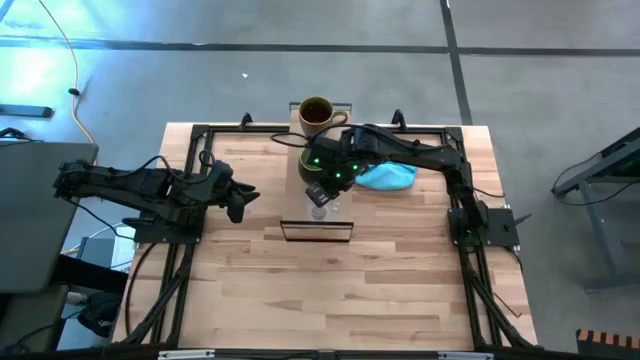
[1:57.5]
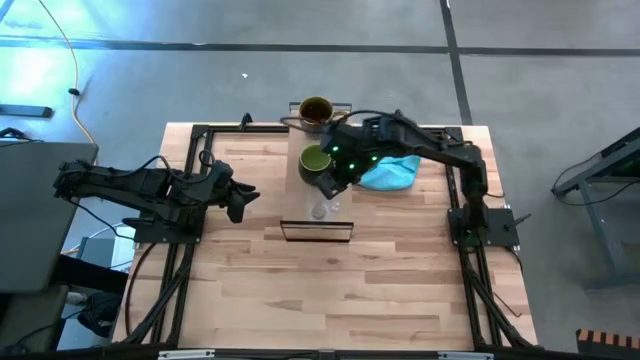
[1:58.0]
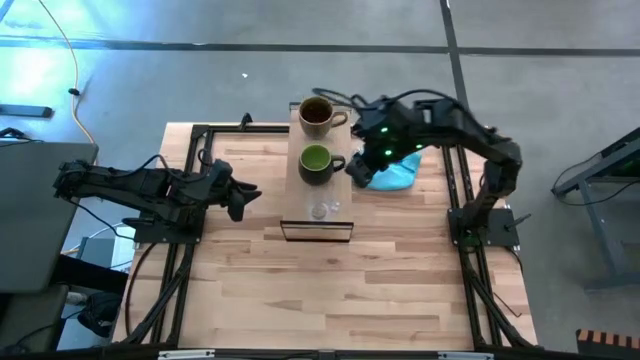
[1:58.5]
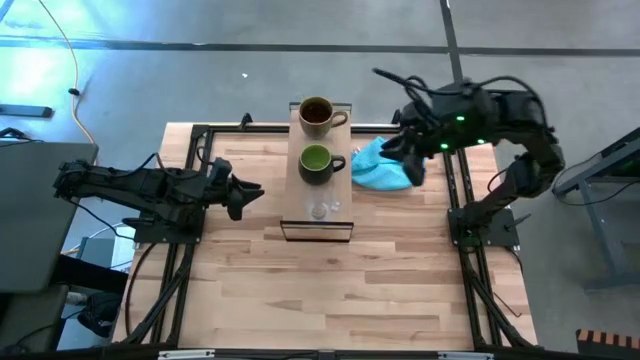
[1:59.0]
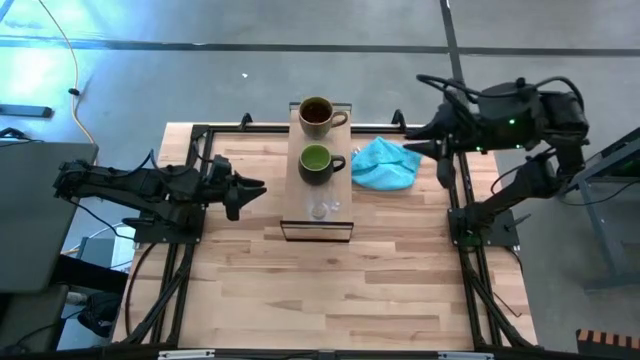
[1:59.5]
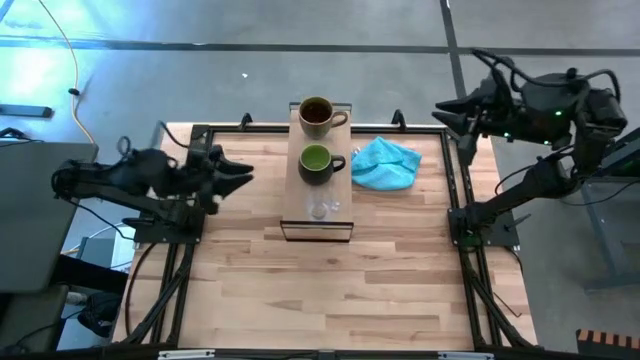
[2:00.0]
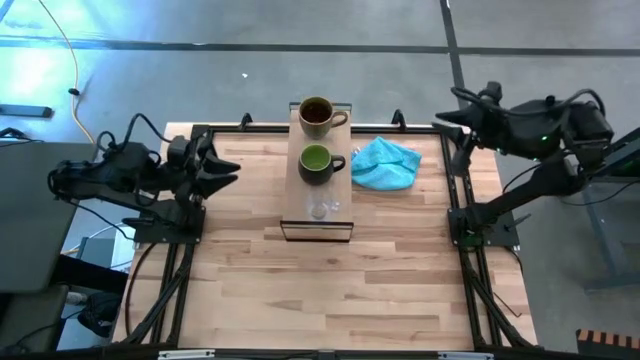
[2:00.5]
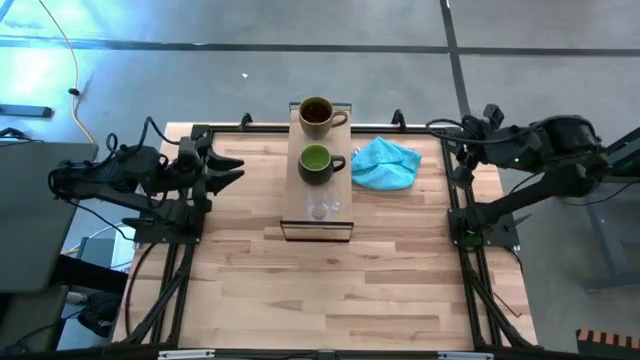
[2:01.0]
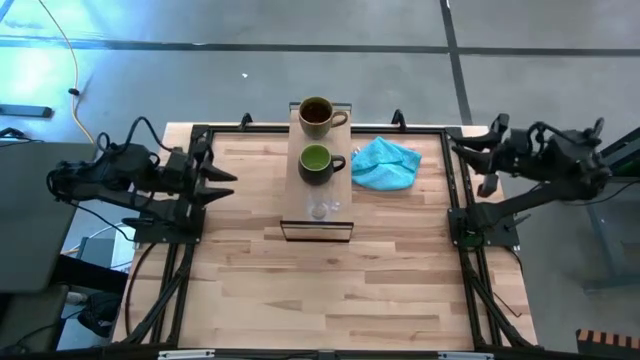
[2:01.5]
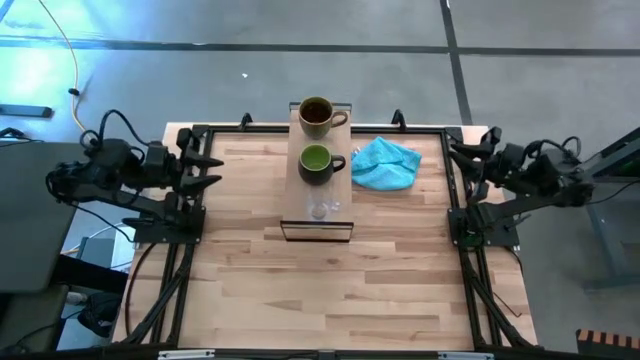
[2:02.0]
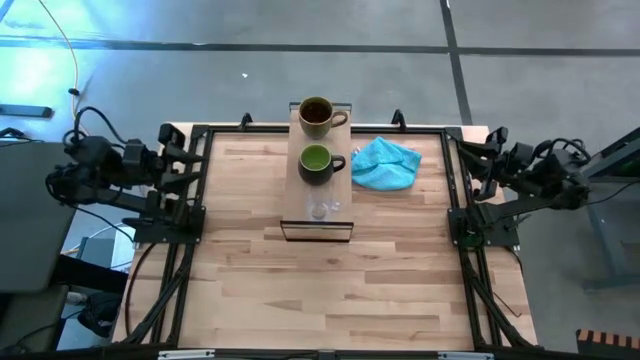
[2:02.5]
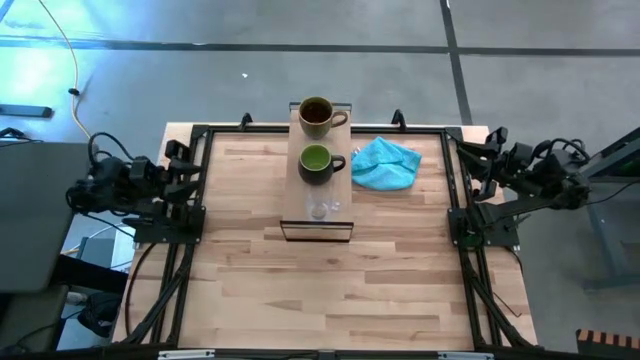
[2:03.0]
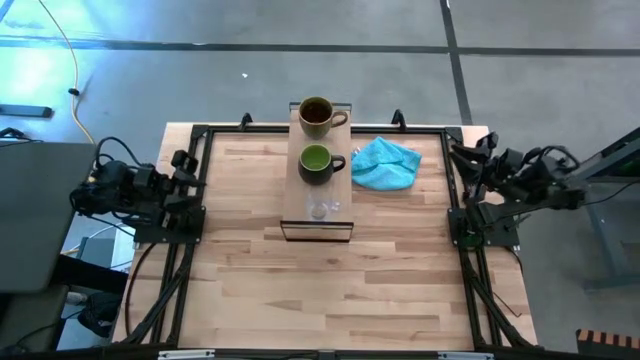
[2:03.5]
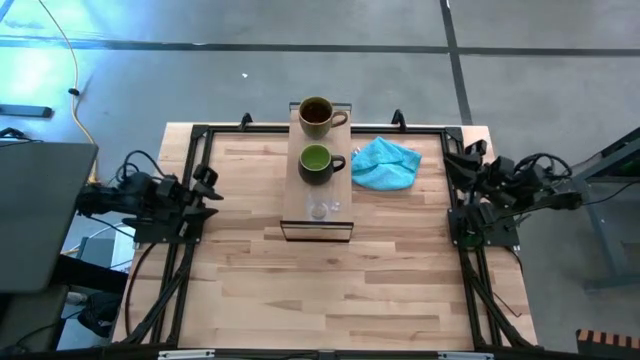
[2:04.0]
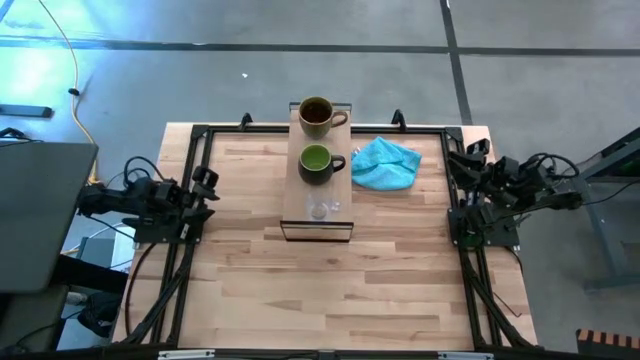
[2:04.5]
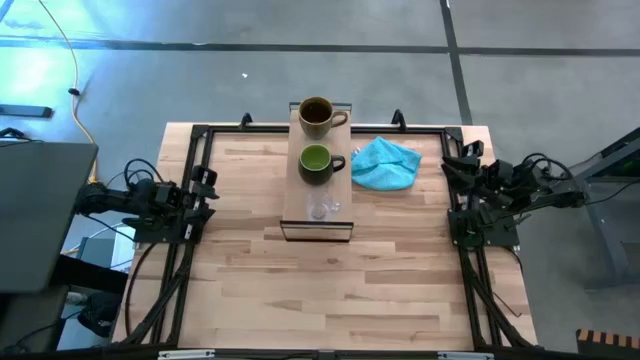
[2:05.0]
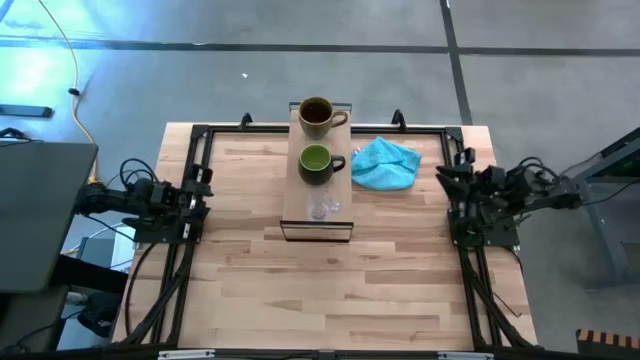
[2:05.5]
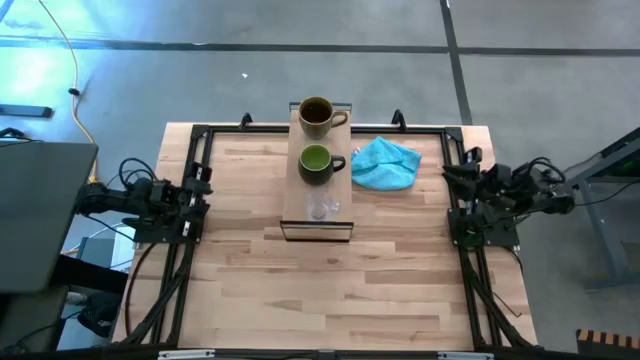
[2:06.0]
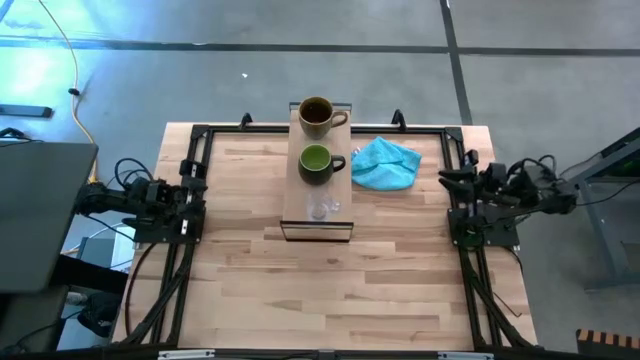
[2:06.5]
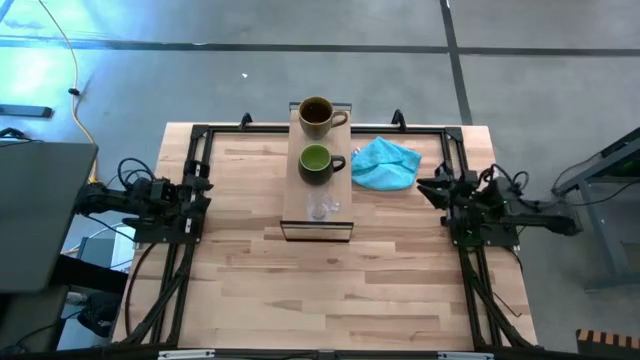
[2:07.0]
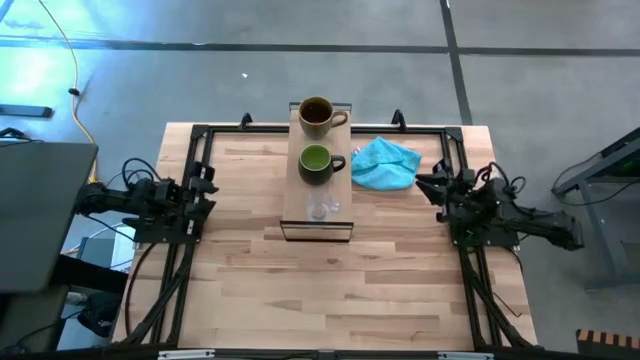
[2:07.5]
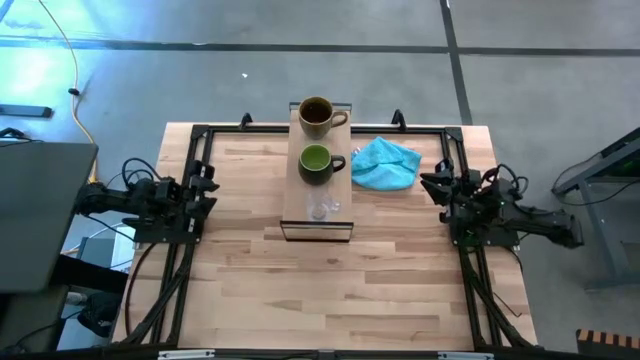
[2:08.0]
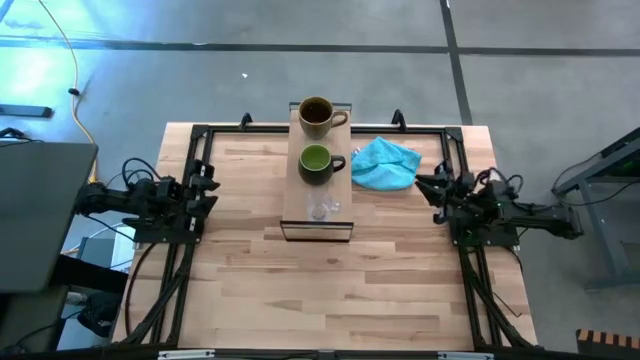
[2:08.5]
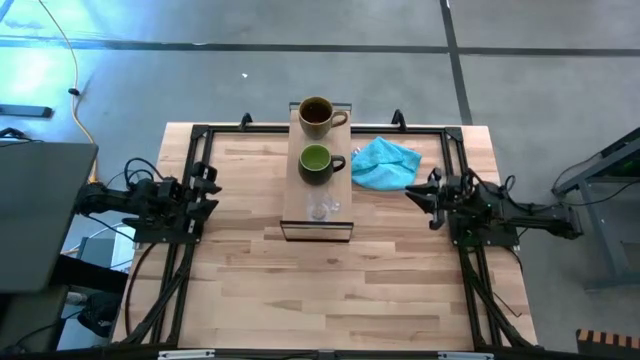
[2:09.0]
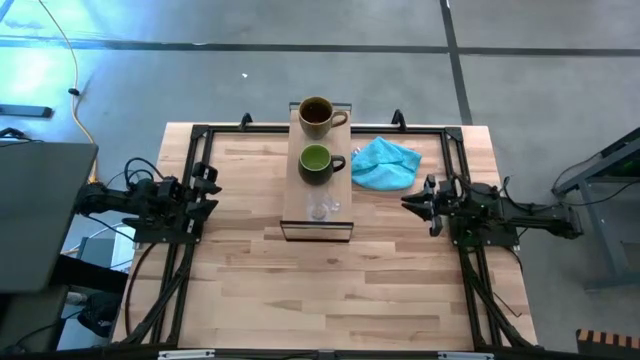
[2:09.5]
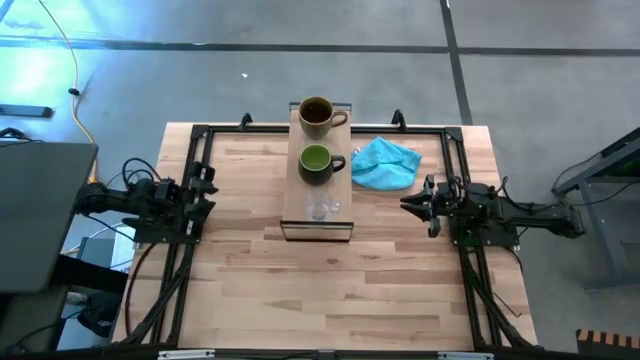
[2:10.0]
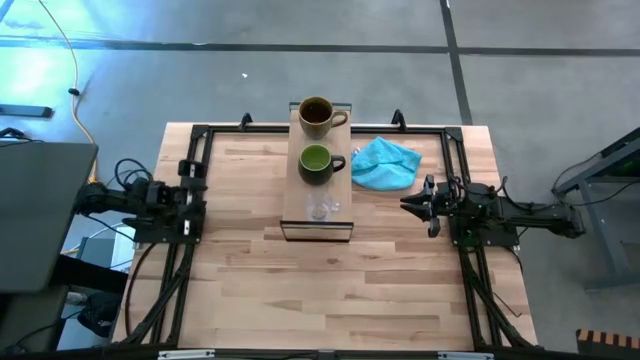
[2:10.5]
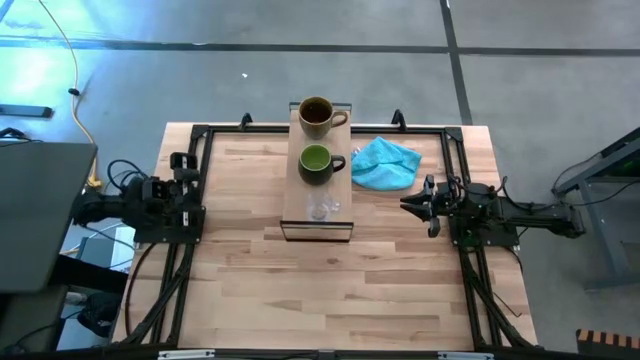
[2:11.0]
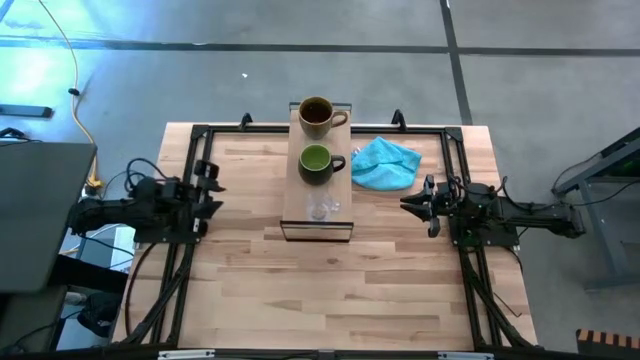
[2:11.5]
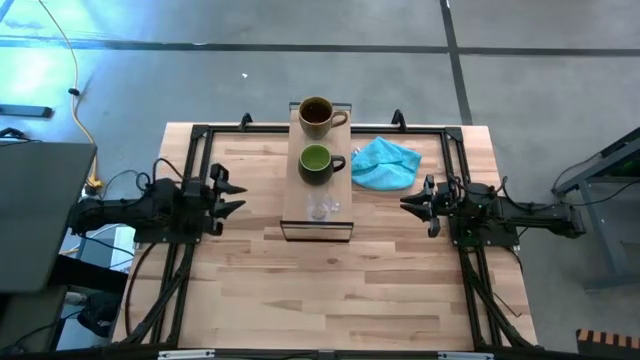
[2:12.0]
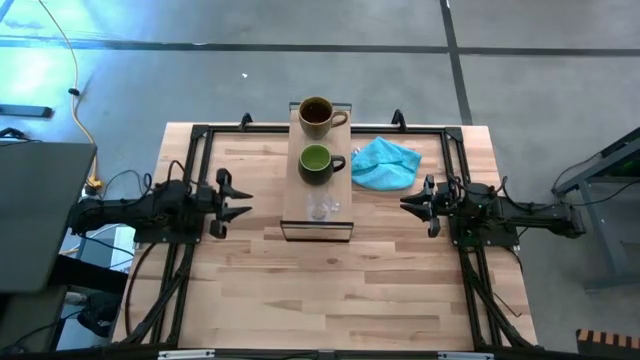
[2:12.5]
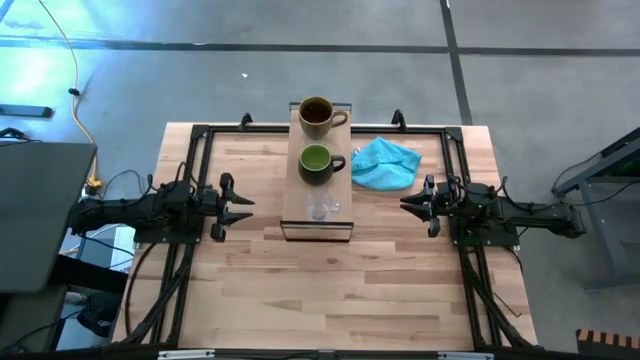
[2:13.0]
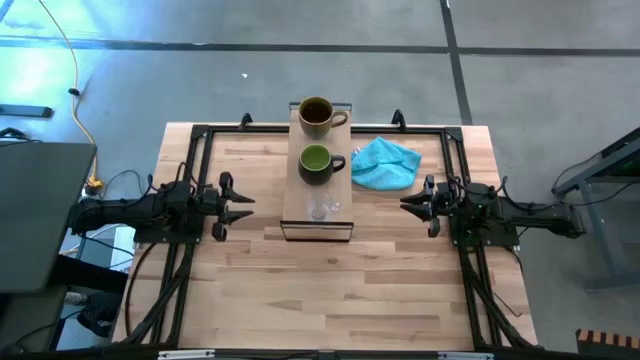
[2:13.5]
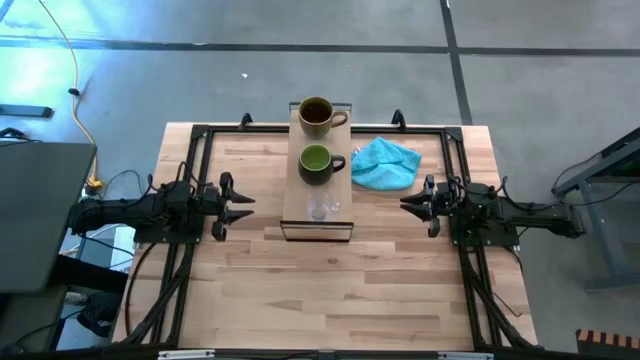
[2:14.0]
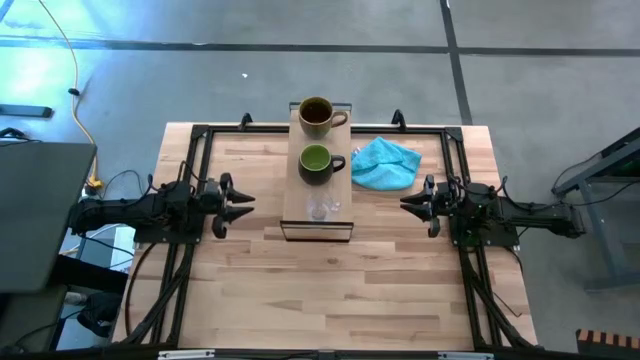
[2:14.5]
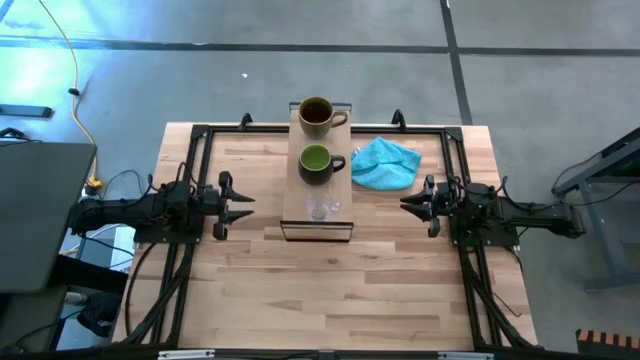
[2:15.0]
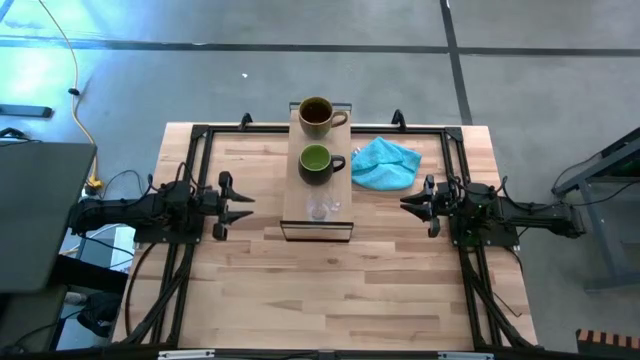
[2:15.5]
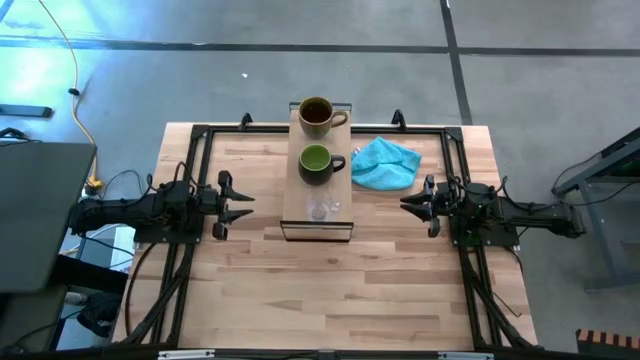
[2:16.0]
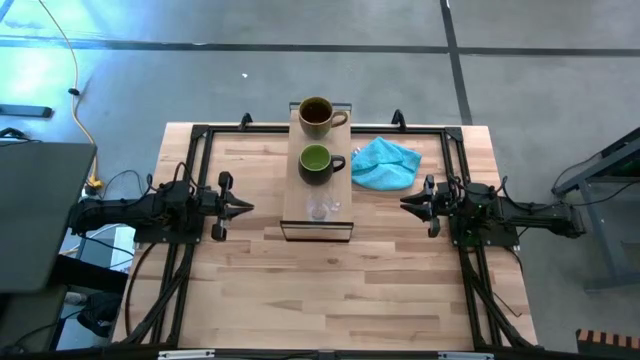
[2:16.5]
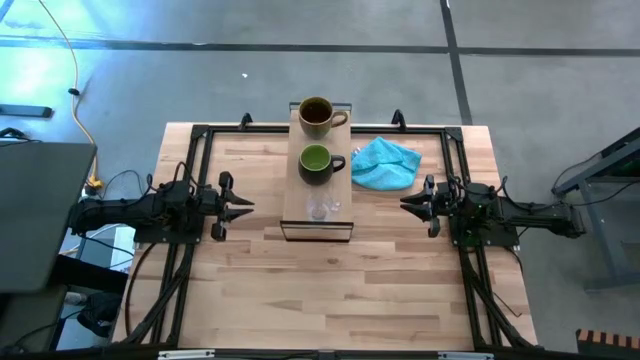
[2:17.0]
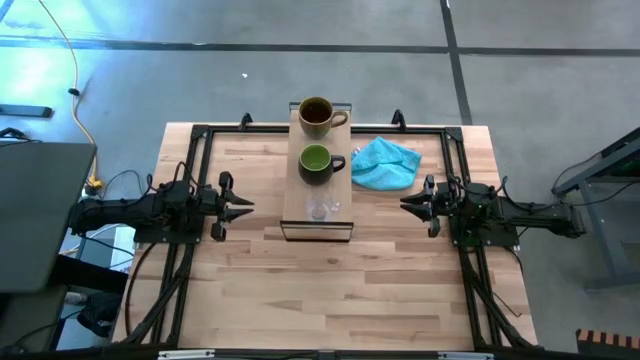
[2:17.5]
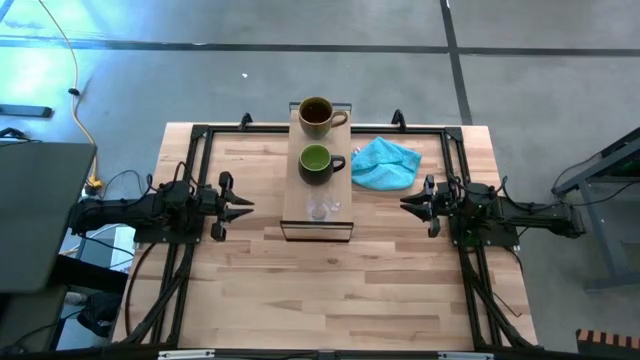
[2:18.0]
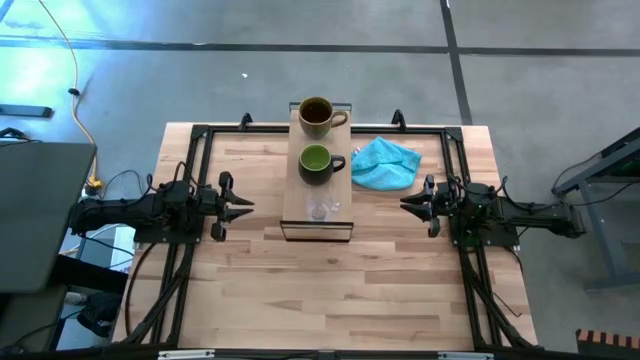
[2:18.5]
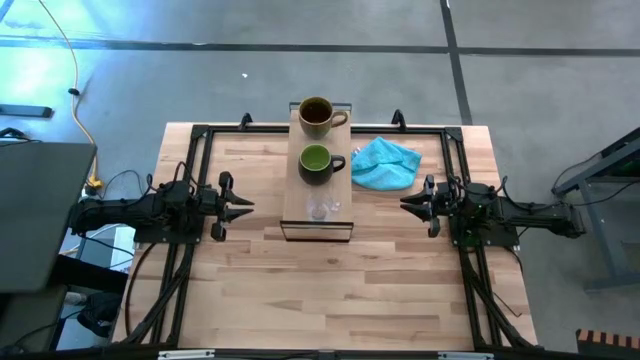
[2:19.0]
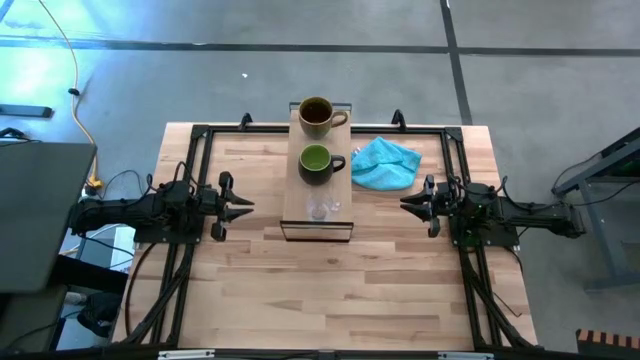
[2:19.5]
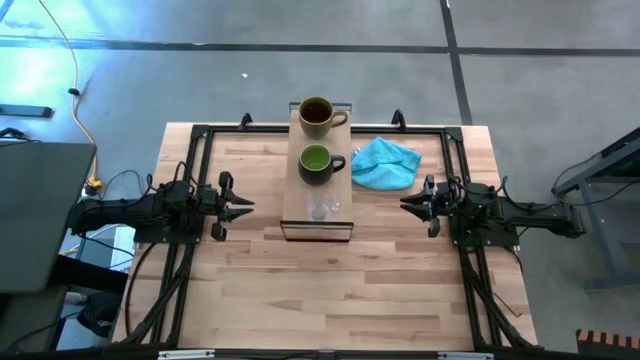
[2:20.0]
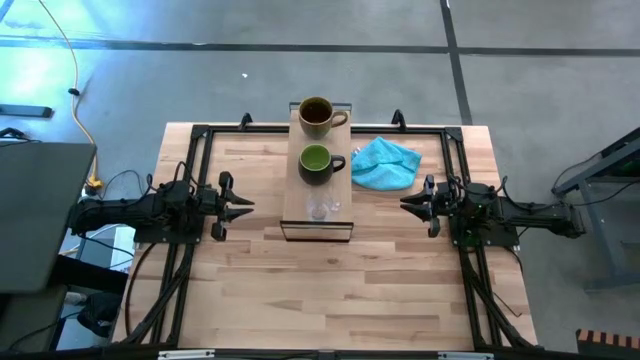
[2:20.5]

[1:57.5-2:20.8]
Task: Stack small to large cups/mugs on shelf
Return to Home Position
